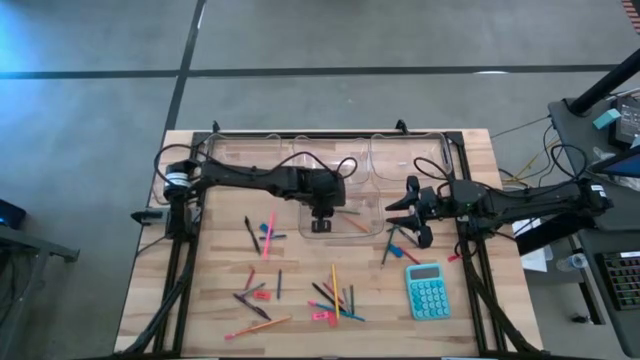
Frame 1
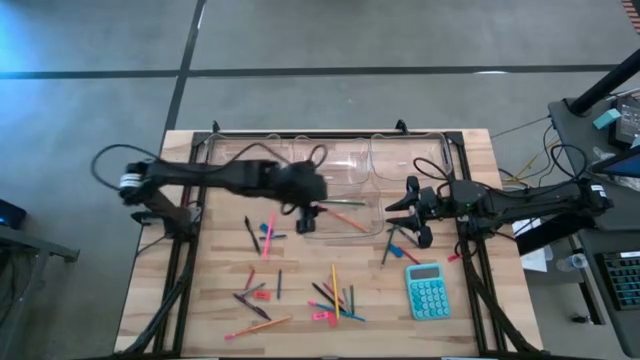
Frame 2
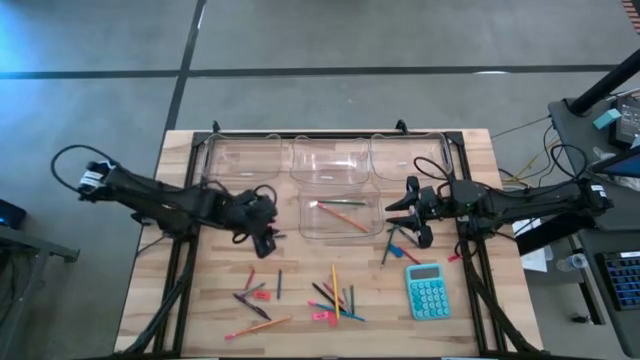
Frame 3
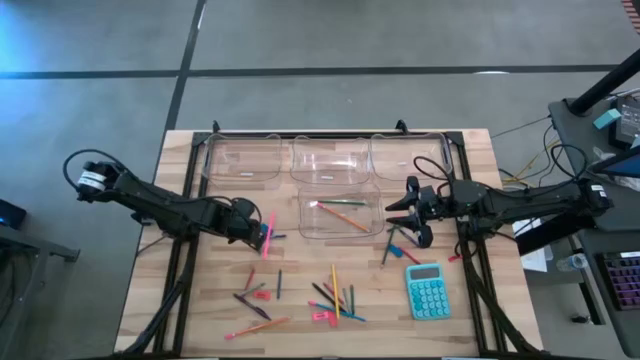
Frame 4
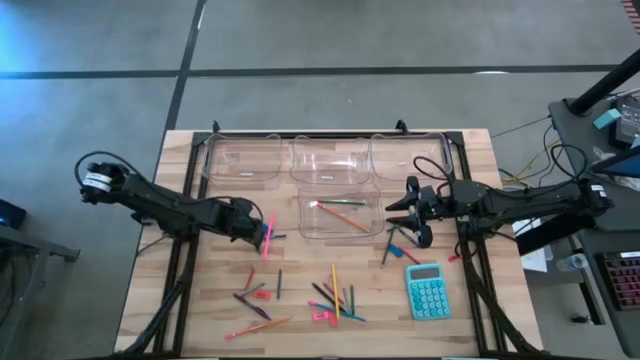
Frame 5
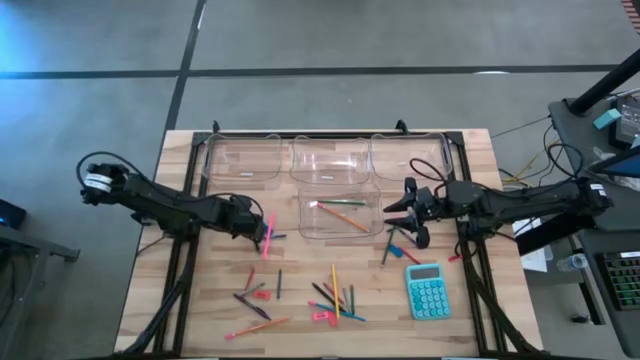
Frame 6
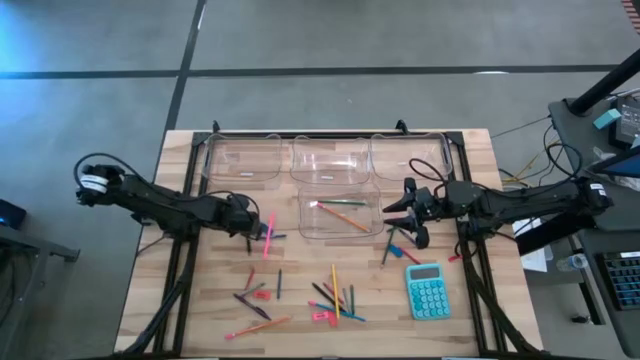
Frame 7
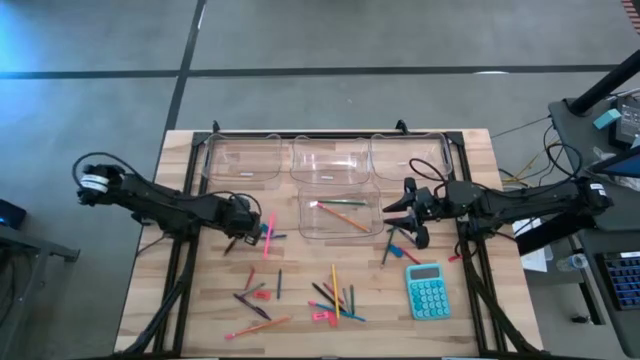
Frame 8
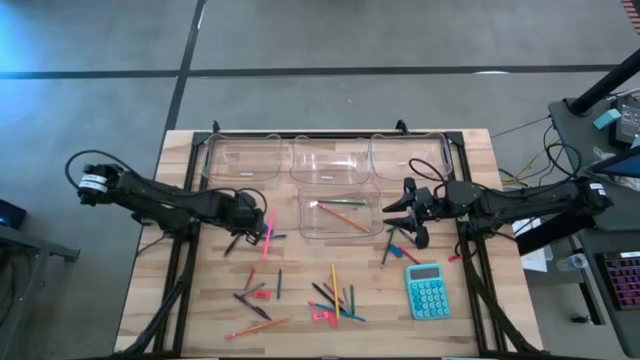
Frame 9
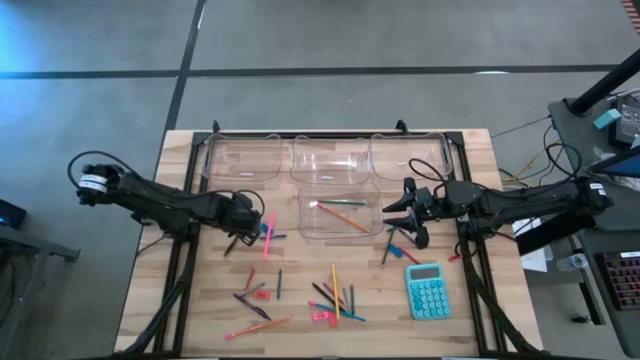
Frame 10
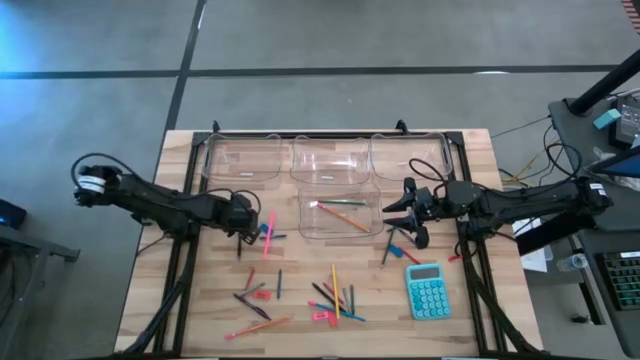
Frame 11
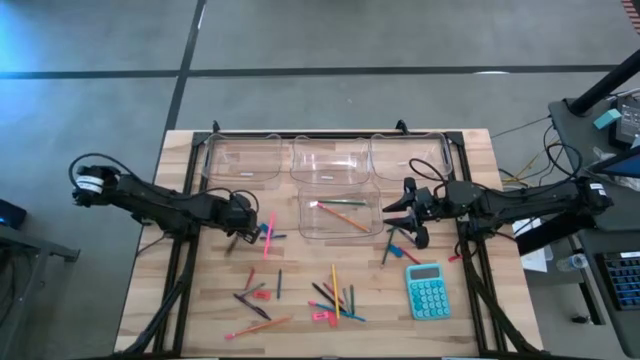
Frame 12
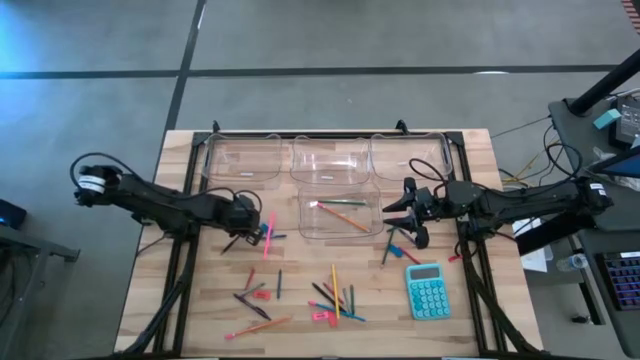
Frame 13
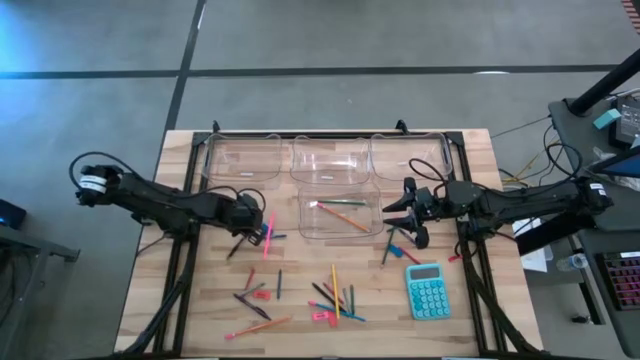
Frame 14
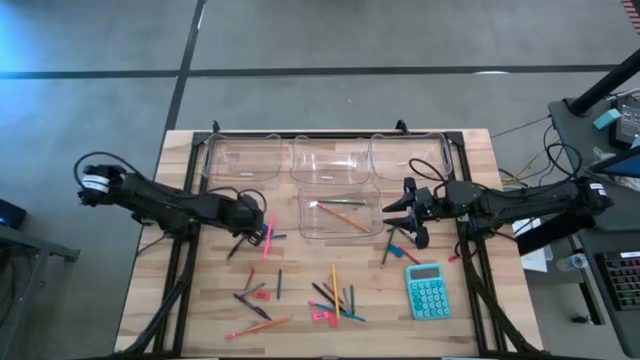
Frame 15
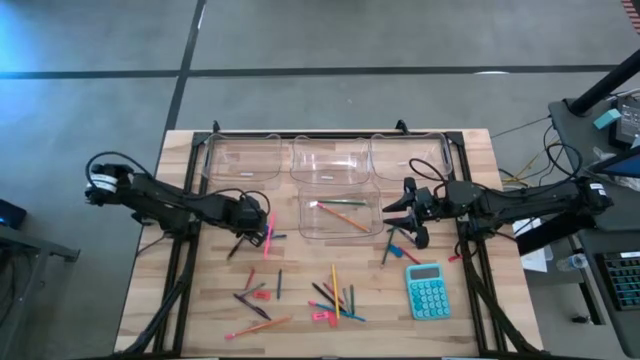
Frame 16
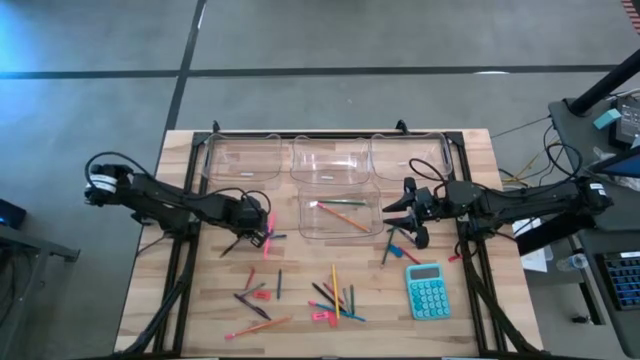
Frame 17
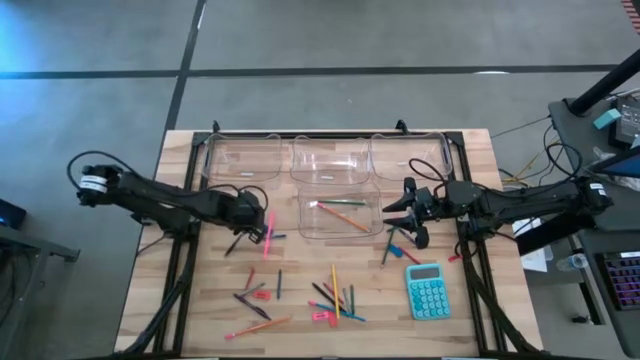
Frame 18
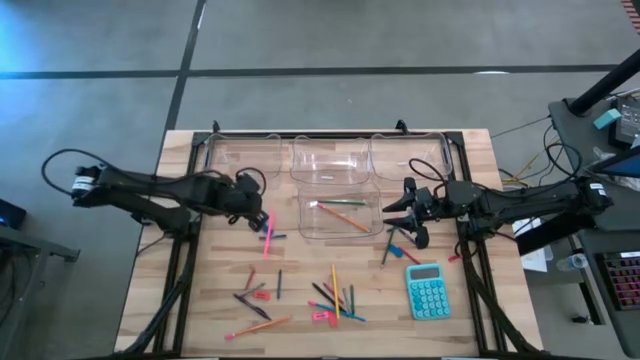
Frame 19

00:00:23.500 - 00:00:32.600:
Task: Sort crayons/erasers/pens/pencils in bins
Put the top black pen into the top left transparent bin

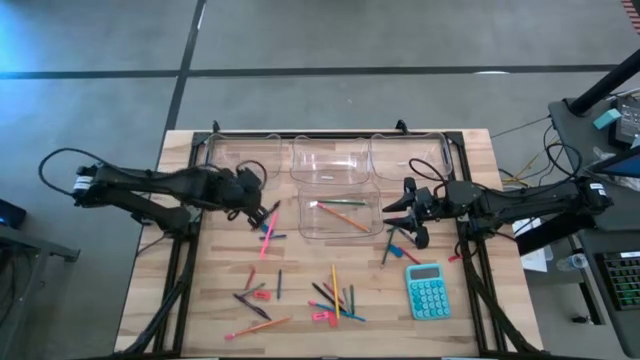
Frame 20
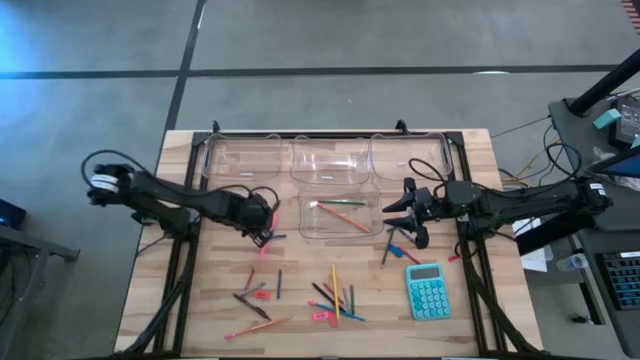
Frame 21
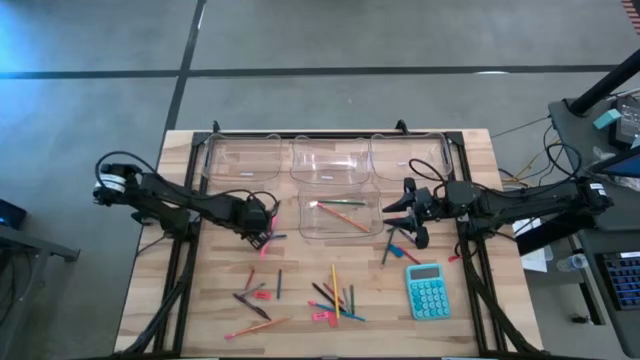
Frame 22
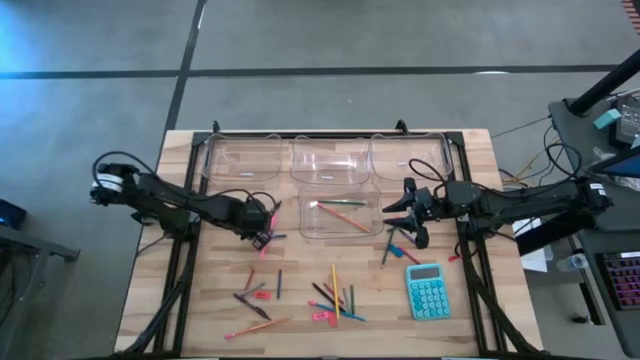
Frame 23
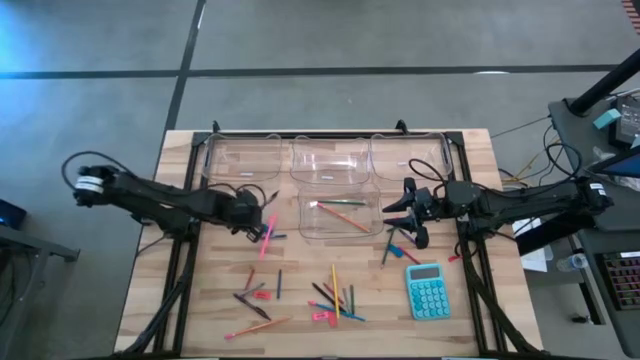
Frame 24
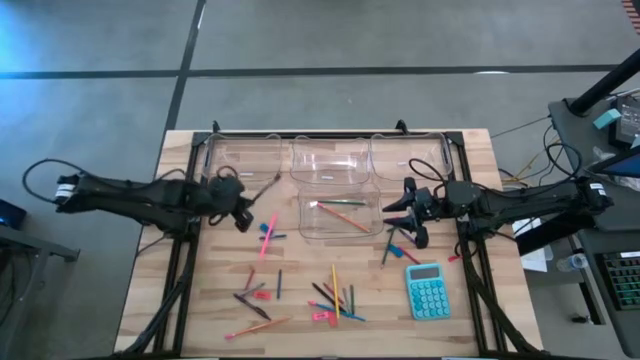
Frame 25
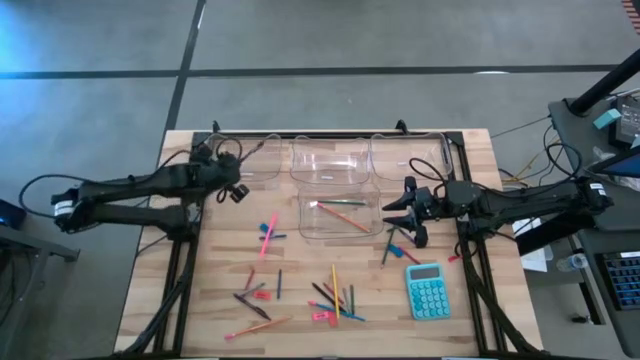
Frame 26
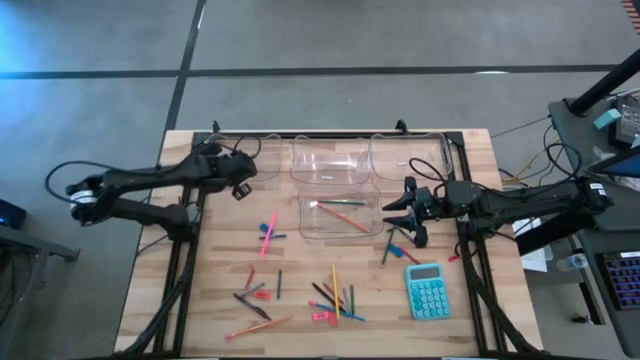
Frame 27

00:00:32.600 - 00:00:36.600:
Put the top black pen into the top left transparent bin

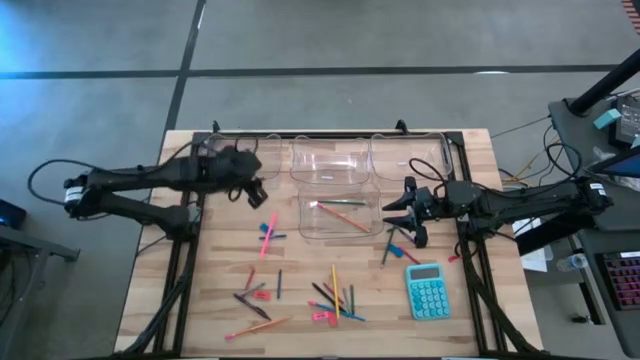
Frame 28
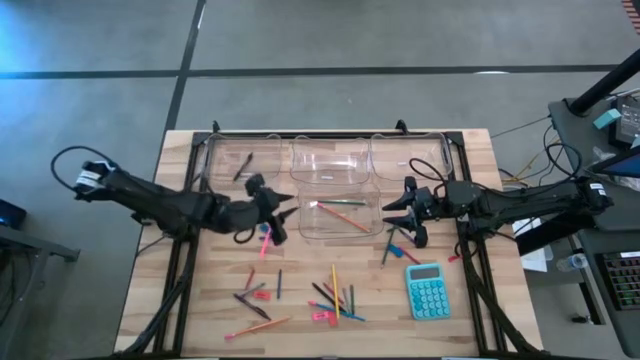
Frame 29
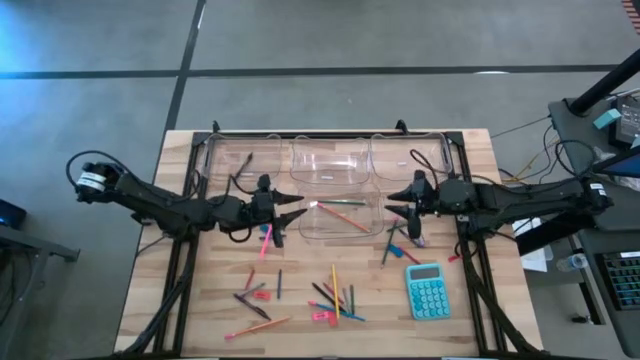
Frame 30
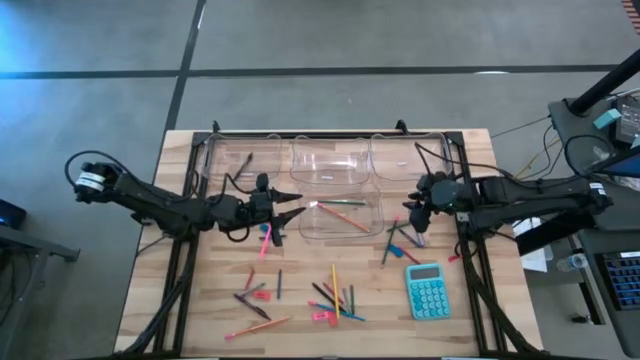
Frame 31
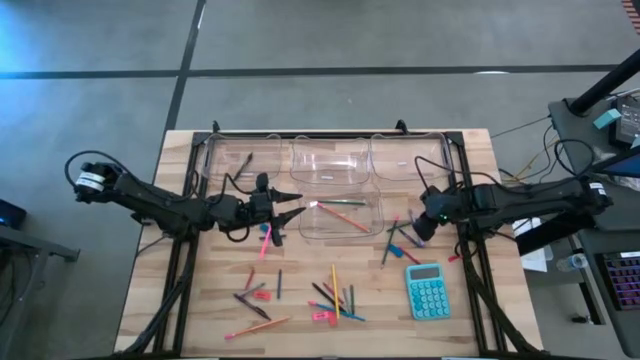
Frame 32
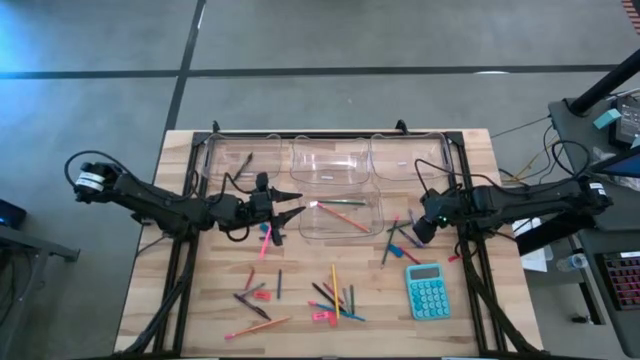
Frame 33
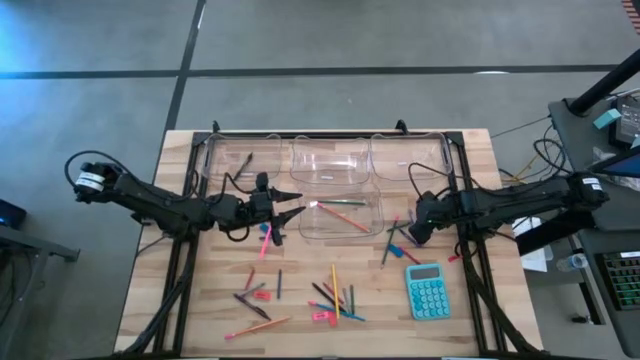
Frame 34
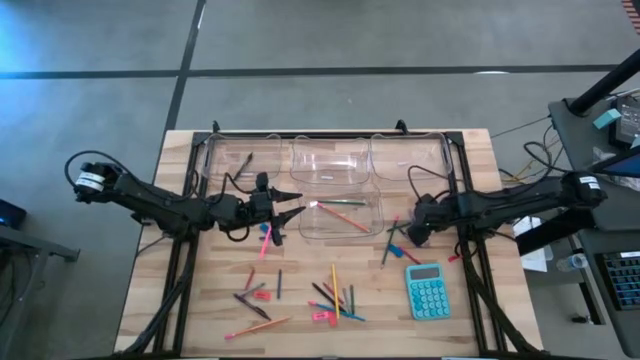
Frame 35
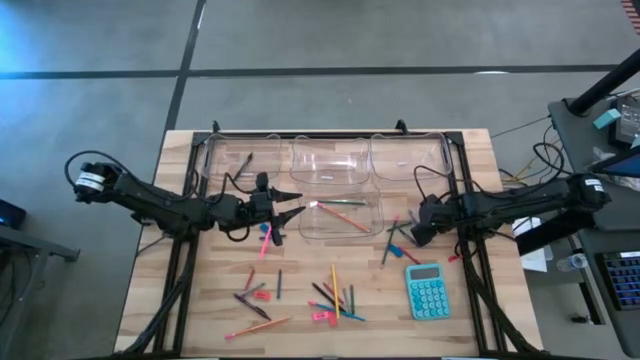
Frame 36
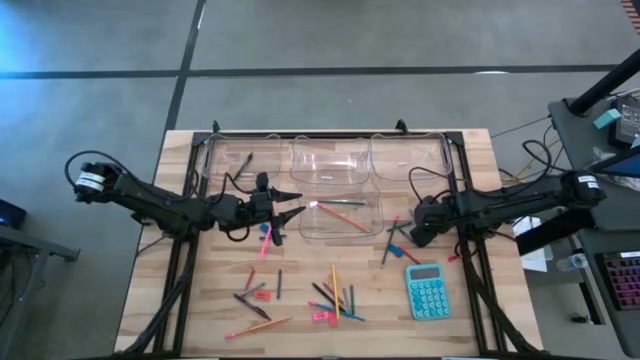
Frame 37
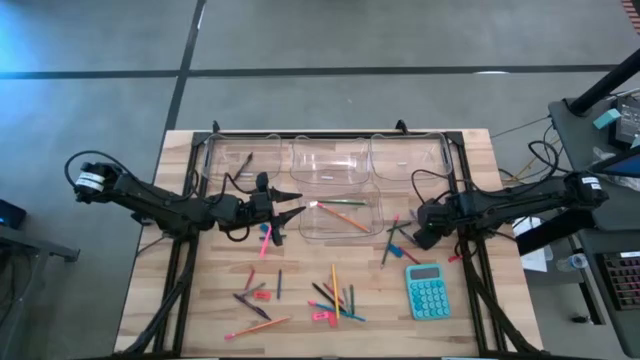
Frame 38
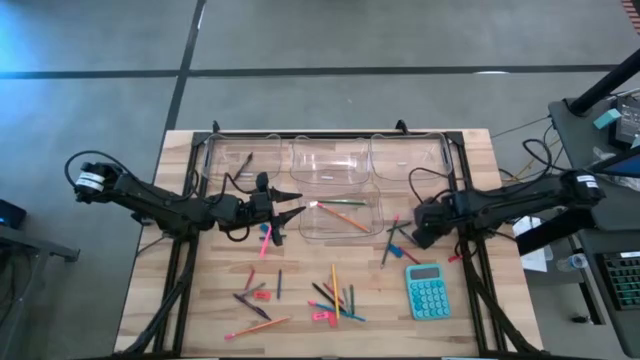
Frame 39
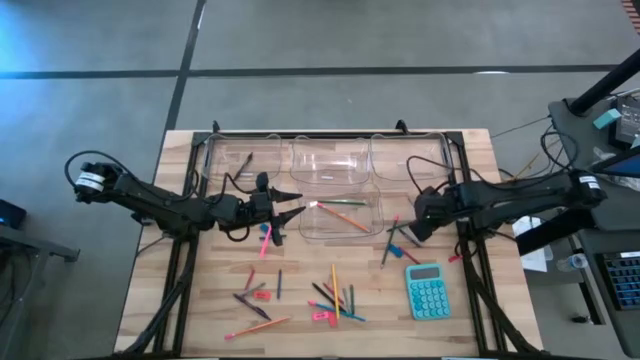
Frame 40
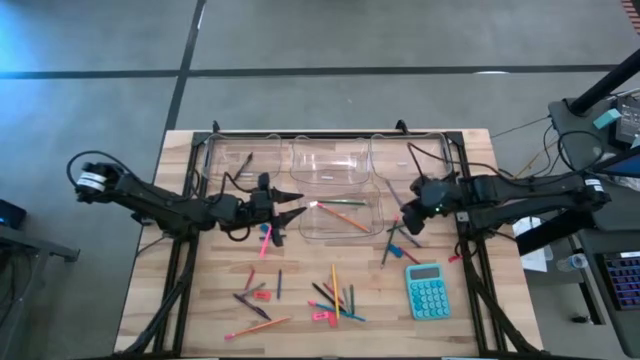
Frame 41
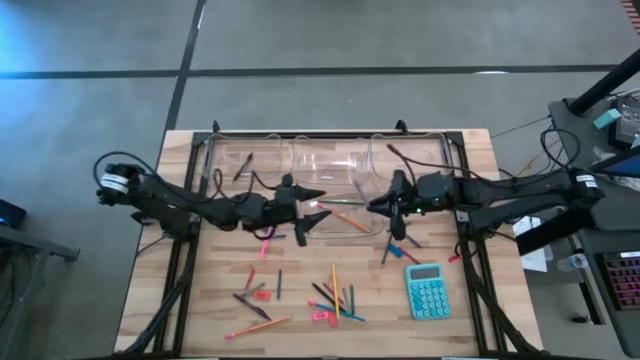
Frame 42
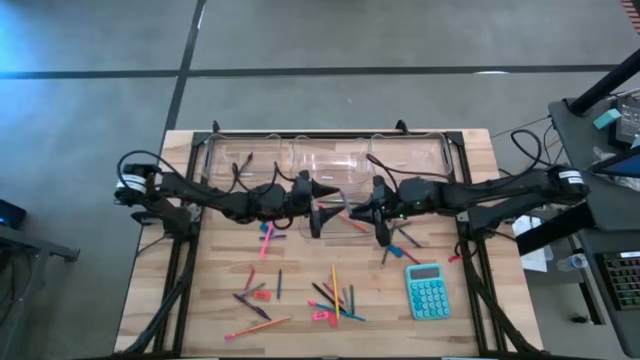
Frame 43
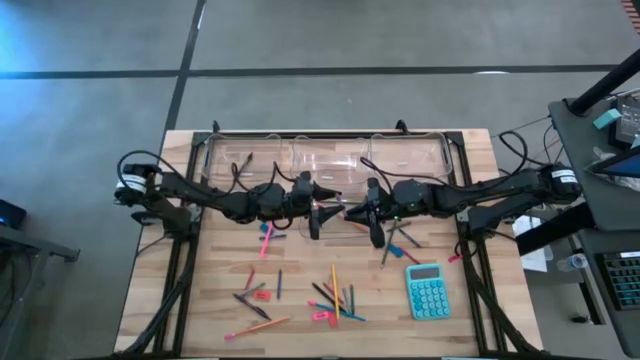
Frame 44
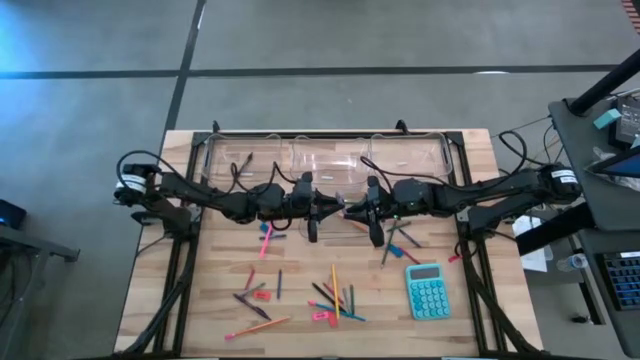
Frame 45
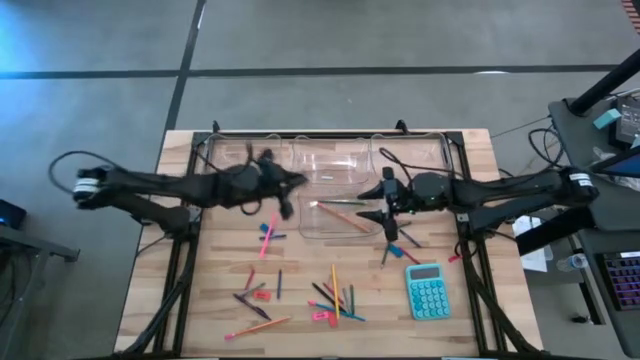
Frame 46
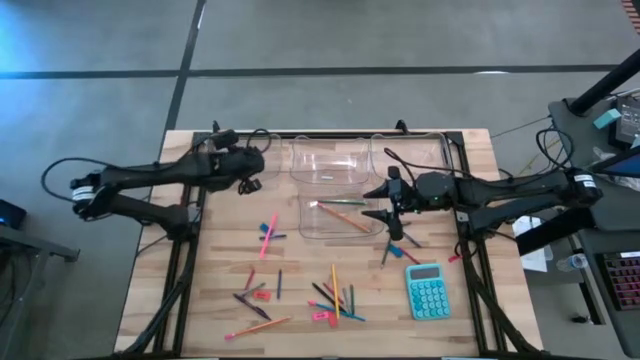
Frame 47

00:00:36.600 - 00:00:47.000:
Put the purple pen into the top left transparent bin
